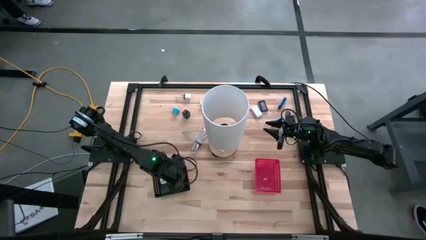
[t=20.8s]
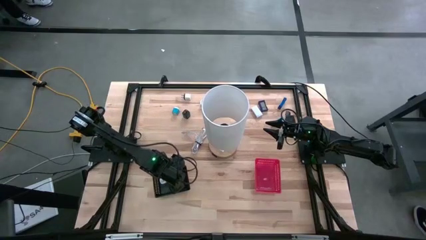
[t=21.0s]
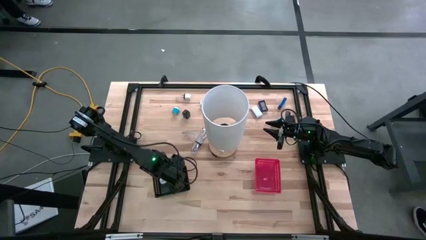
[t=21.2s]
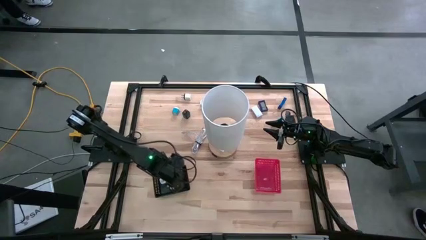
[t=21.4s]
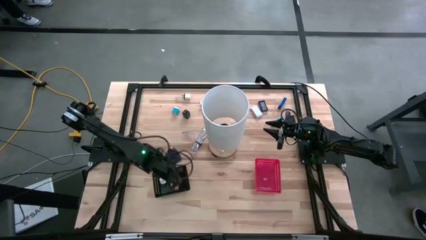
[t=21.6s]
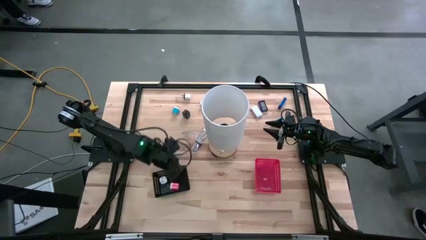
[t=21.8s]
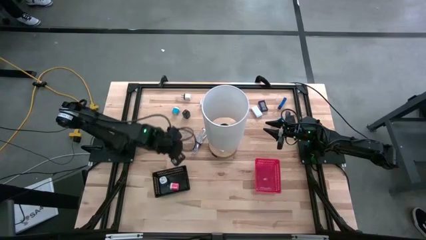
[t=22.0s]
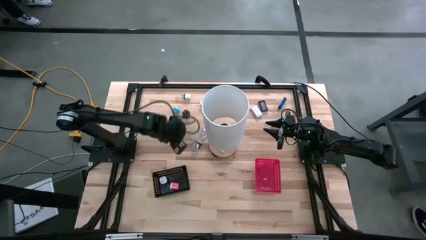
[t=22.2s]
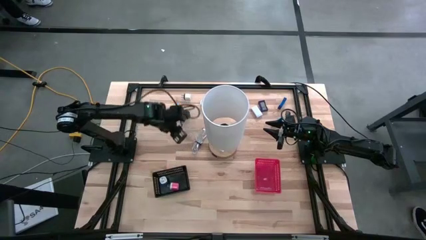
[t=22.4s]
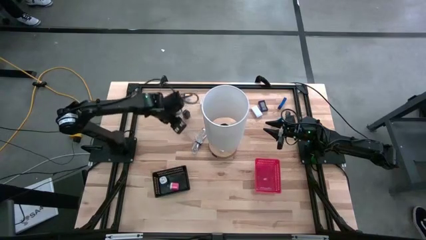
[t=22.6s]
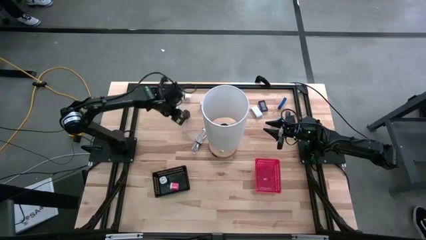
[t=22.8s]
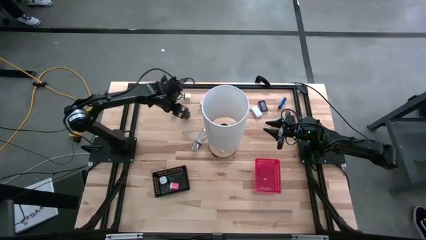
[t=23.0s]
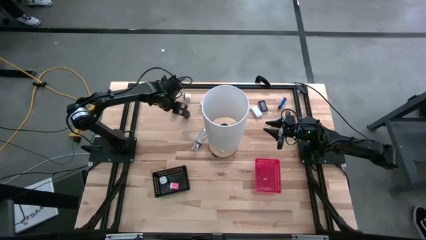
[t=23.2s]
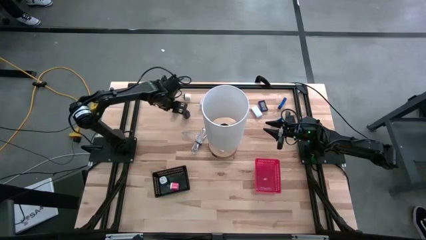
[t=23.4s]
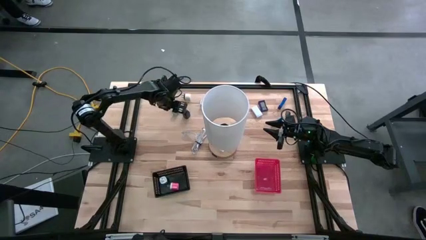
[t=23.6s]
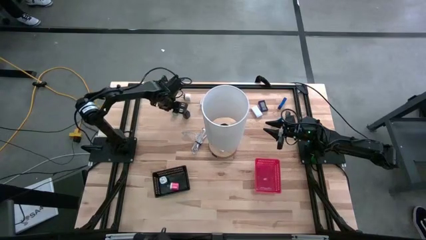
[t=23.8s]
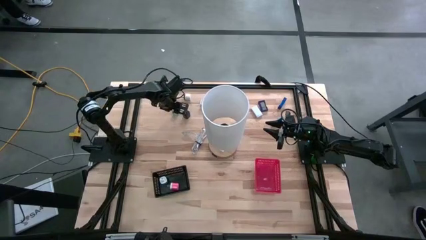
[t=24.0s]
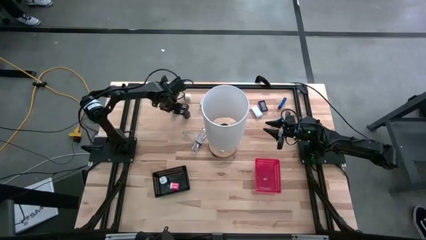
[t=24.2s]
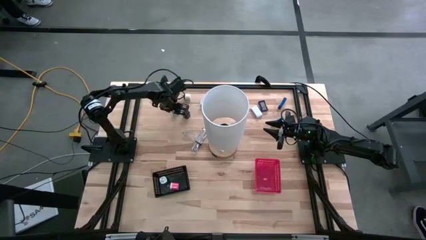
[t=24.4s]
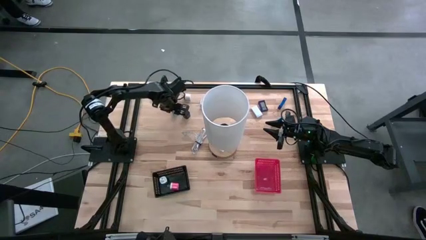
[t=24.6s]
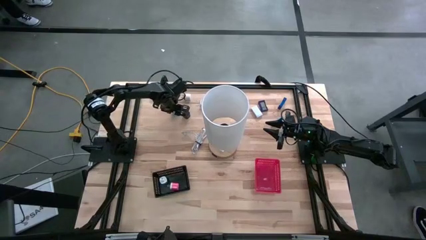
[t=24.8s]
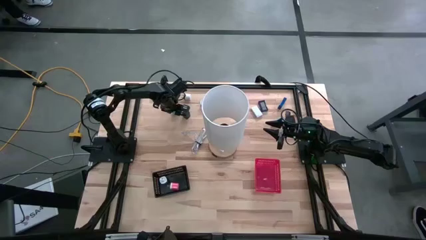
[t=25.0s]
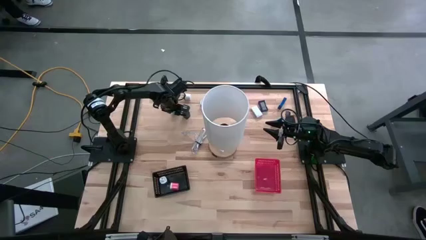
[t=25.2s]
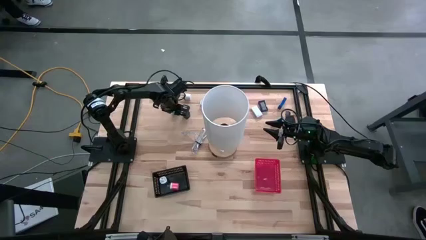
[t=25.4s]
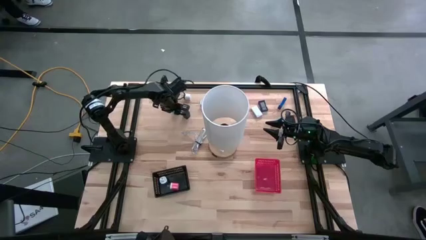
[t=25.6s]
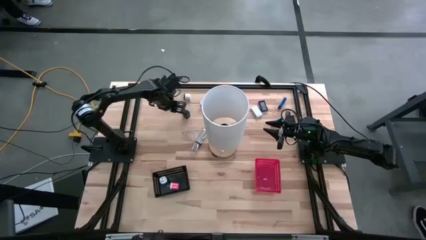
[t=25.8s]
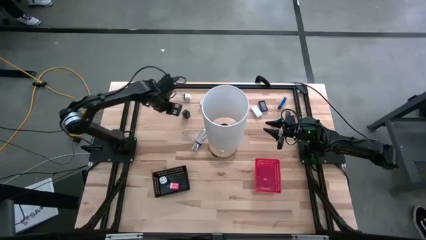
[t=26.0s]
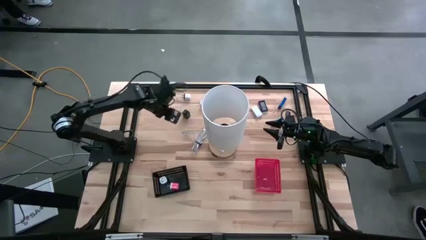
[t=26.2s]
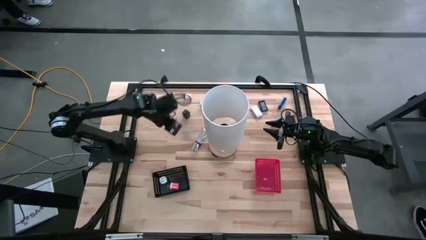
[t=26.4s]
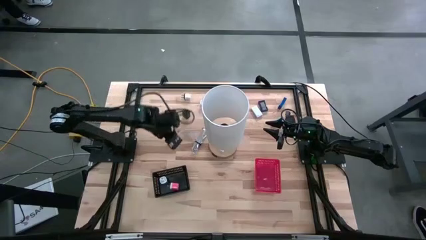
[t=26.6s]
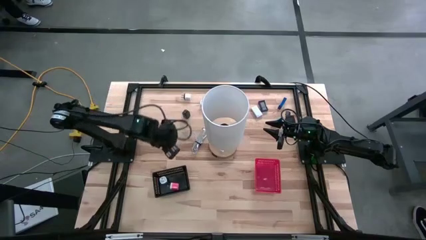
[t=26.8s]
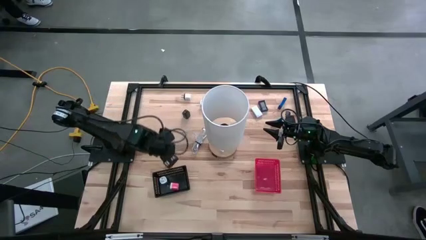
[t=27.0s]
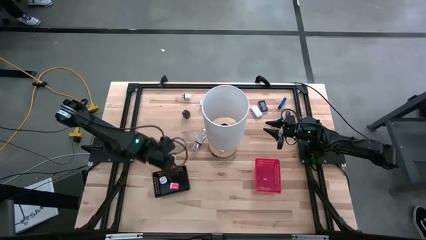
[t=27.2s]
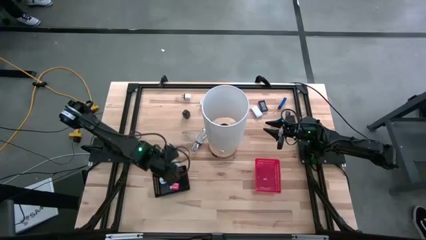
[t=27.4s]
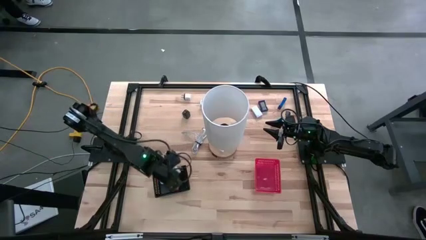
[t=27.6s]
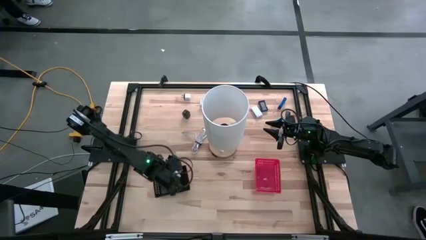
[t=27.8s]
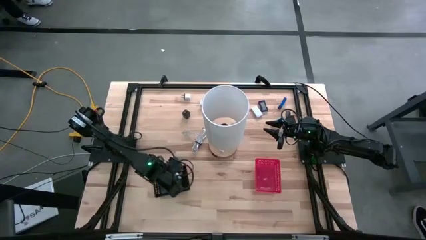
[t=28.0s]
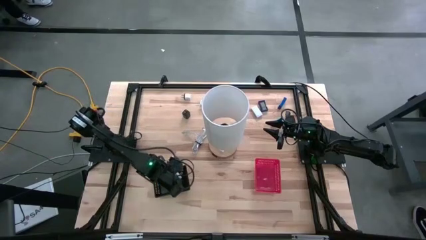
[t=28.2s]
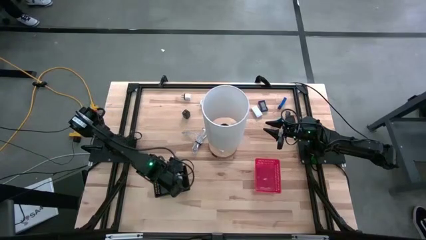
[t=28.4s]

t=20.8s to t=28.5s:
Task: Pick & Place Office items
Put the blue charger adapter into the black bin

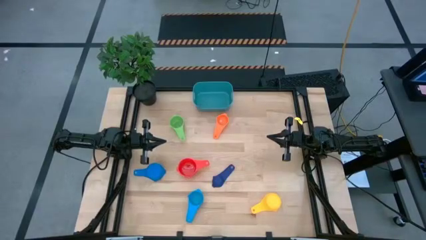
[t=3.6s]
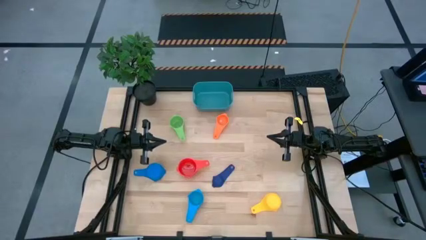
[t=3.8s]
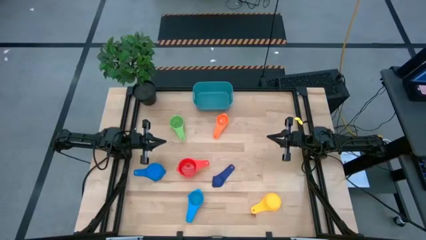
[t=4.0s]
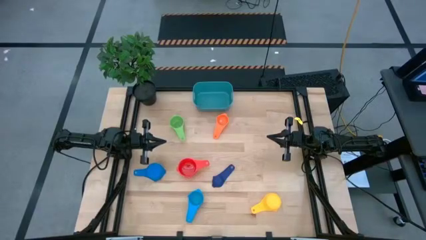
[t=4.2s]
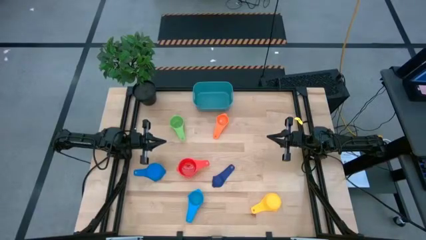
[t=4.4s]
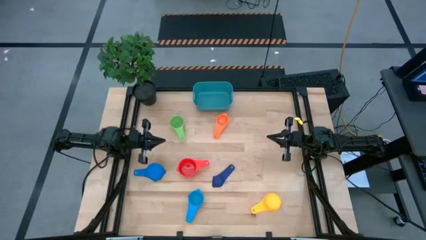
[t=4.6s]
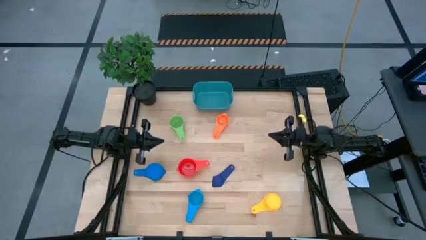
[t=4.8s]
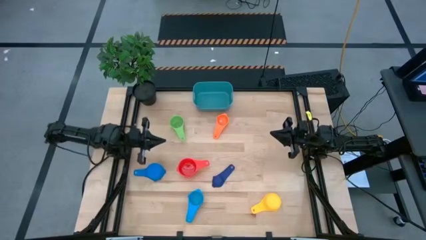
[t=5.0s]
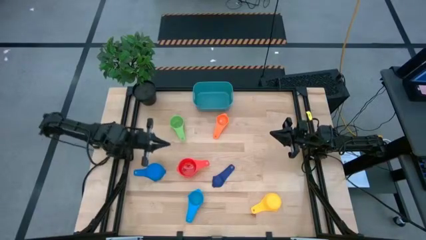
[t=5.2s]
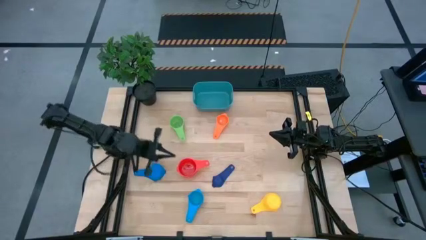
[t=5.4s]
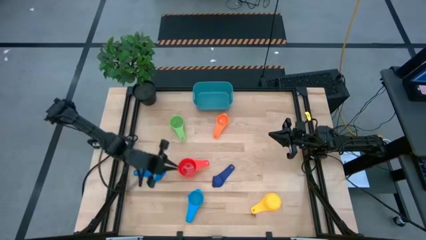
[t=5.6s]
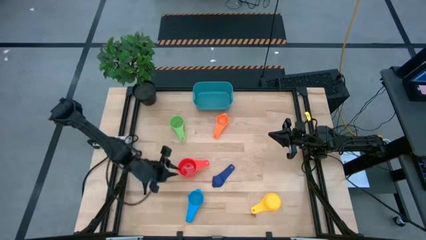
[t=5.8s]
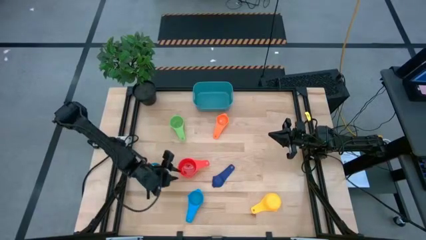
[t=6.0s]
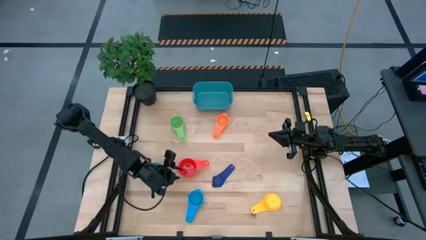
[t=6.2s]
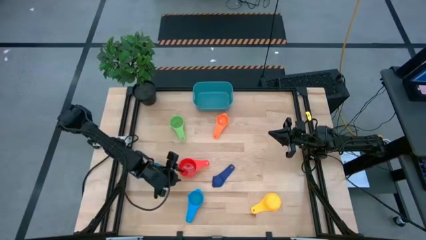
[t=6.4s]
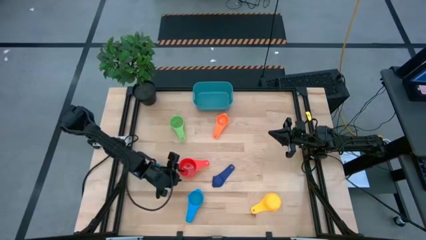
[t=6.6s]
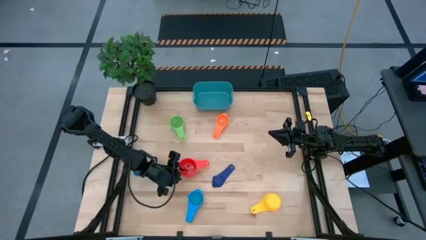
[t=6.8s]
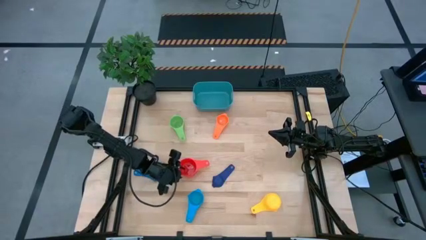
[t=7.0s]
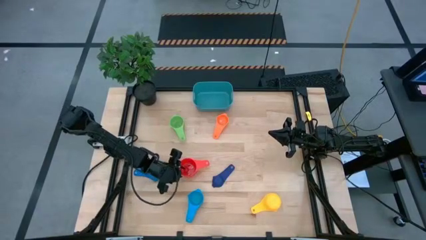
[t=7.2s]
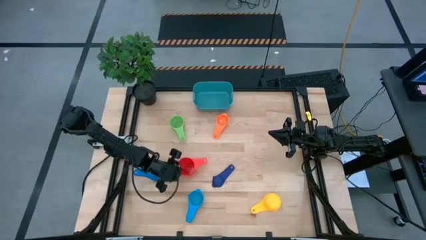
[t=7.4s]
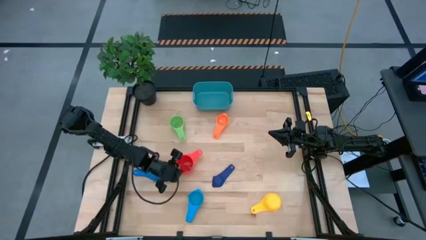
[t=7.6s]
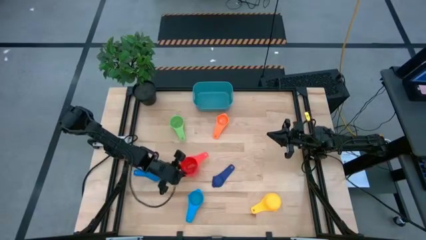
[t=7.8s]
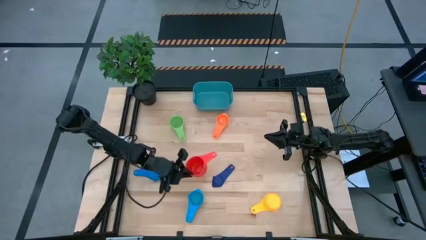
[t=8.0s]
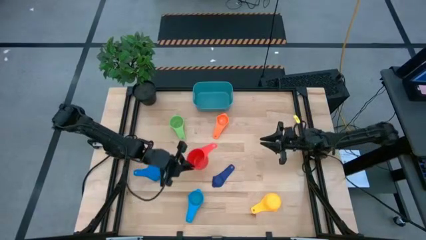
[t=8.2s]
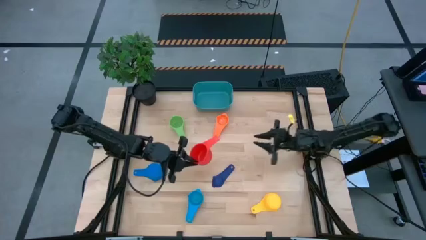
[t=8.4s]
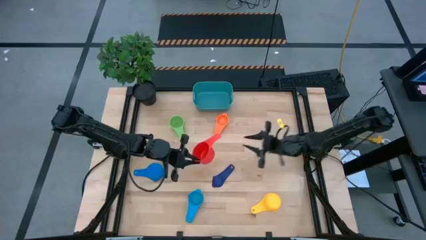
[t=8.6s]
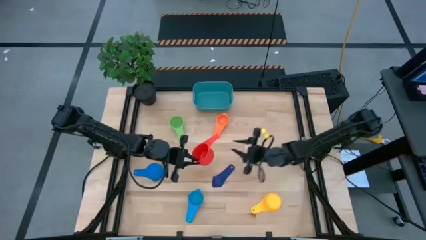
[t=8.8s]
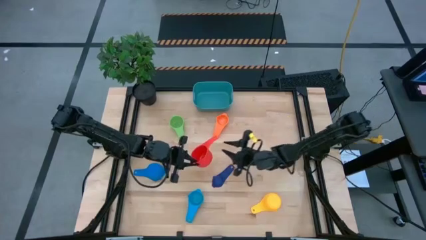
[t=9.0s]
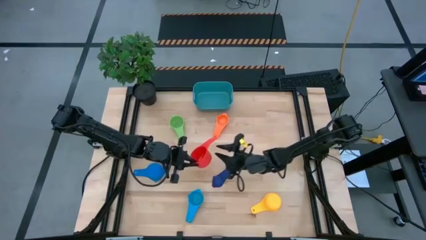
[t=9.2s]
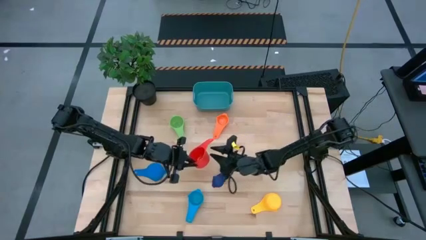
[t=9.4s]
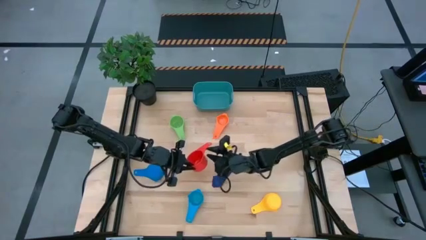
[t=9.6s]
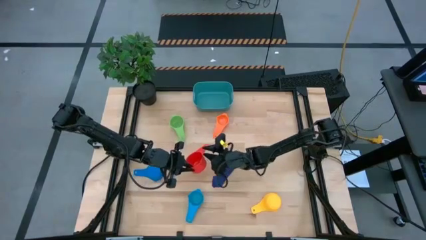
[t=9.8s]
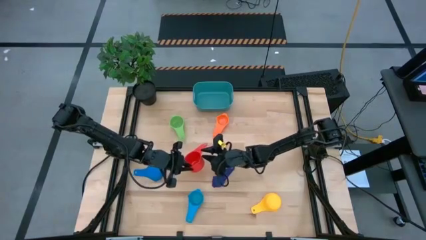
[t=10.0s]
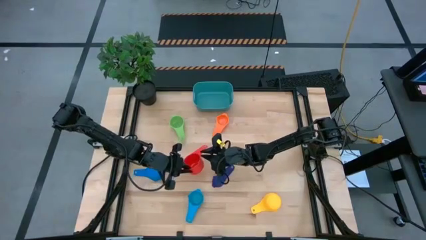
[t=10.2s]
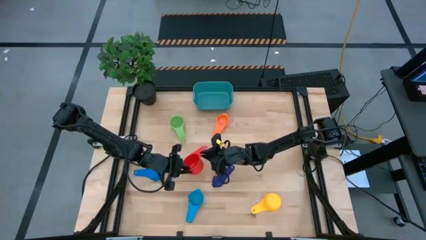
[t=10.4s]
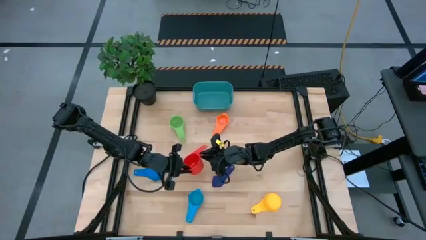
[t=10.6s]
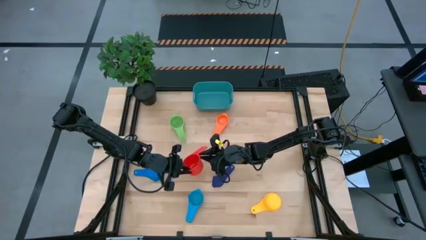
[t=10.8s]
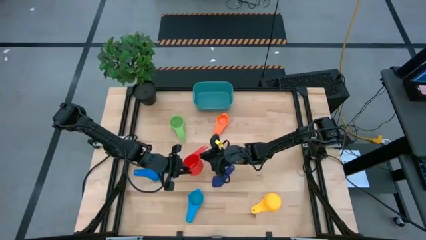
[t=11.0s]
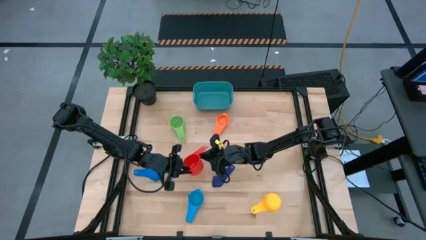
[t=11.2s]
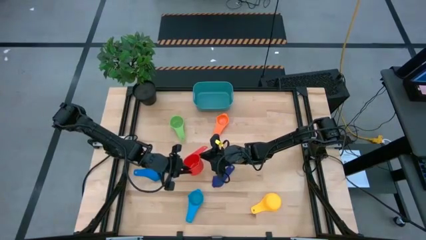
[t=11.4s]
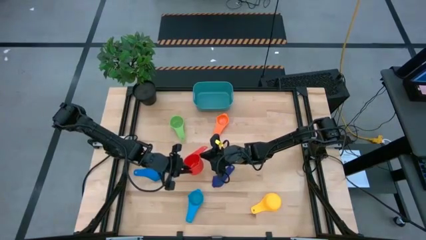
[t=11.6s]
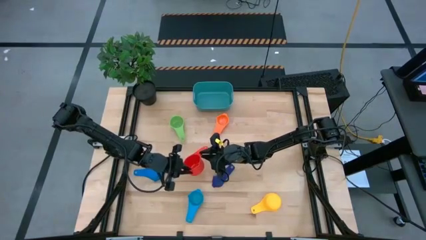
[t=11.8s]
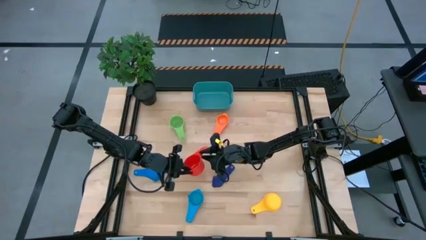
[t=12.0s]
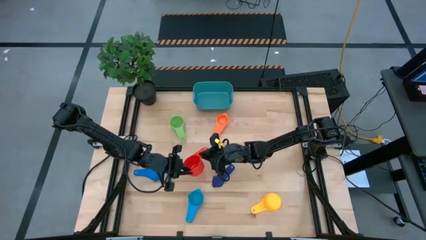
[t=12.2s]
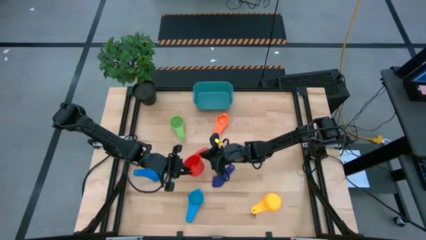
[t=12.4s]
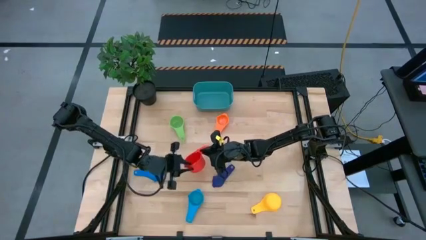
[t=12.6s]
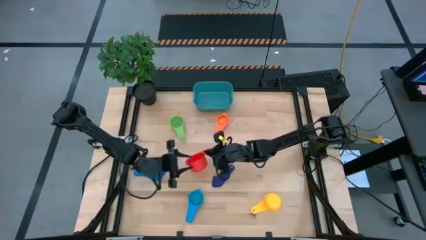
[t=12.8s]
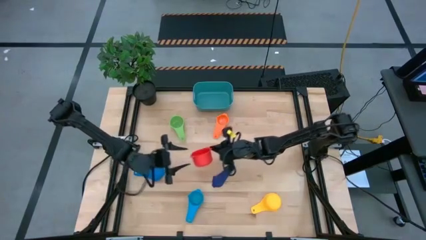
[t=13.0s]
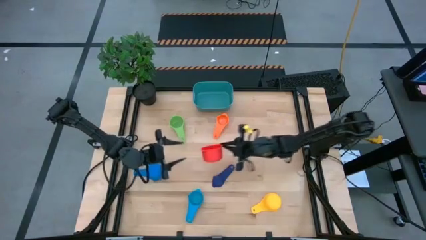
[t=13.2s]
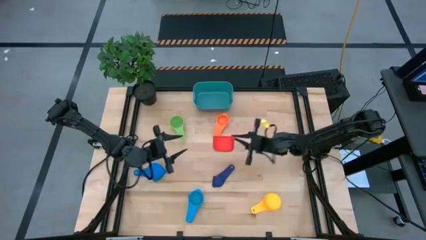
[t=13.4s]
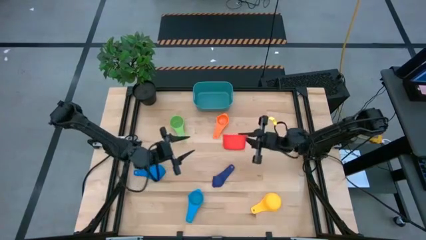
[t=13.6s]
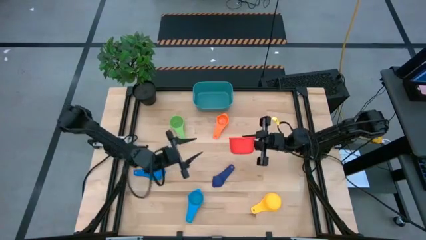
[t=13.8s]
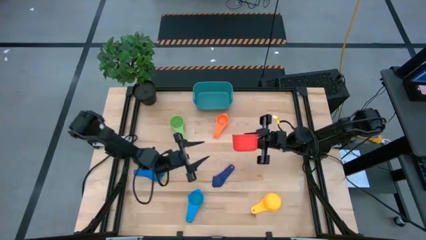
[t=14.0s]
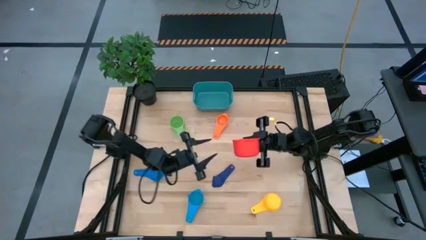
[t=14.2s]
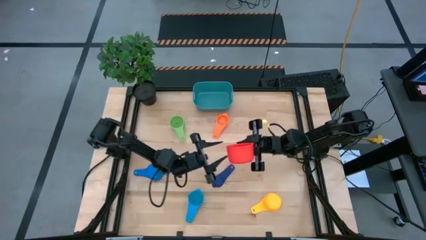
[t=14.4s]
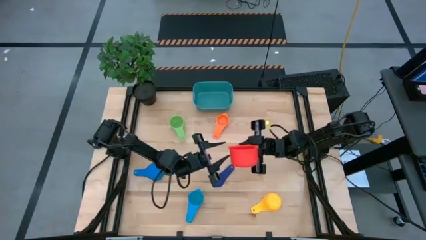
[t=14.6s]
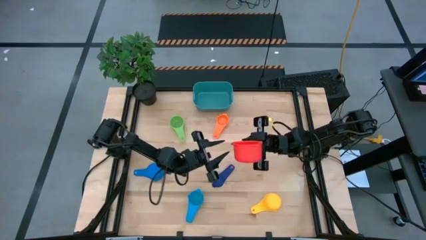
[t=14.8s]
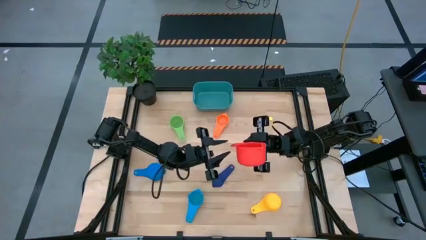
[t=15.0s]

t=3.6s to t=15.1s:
Task: Nest measuring cups in basket
Put the red measuring cup into the blue bin
